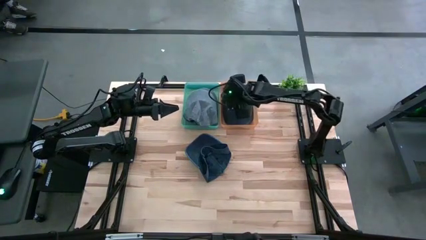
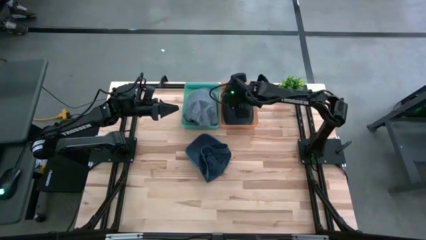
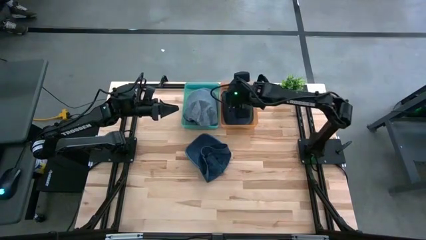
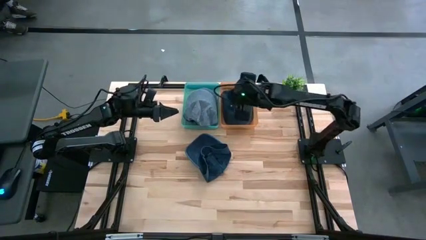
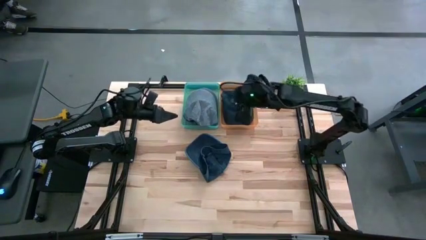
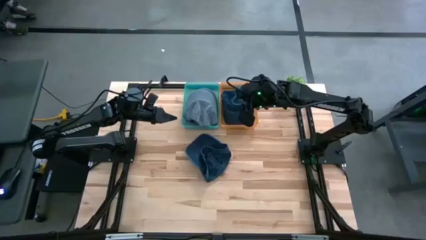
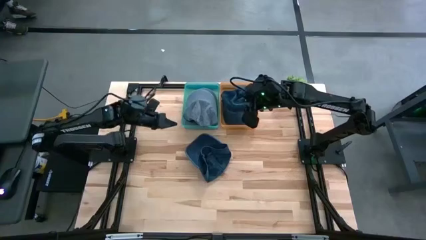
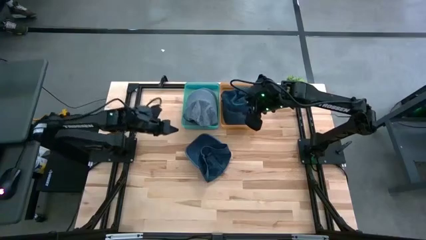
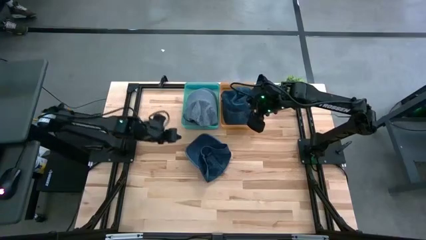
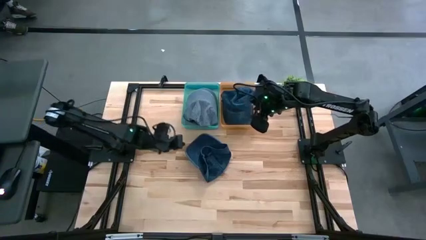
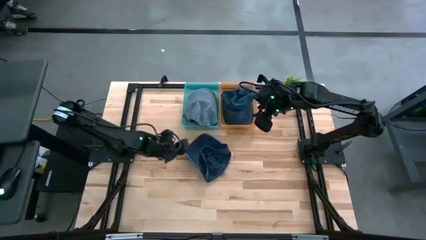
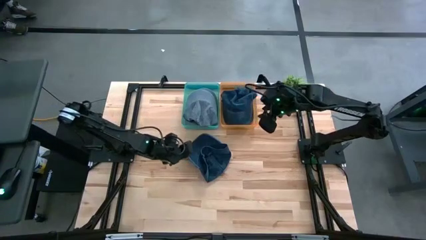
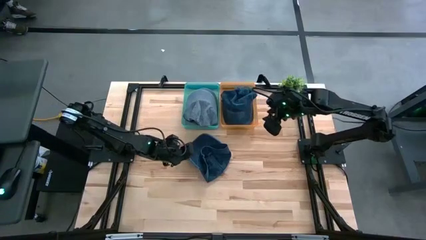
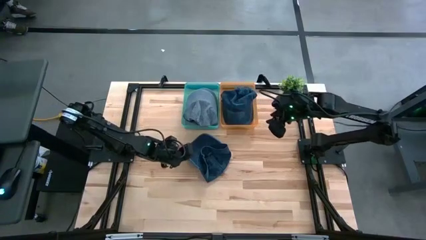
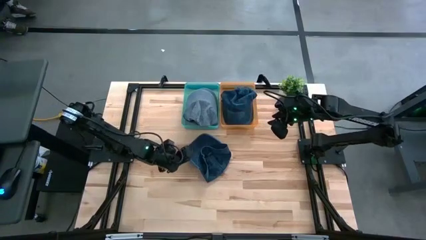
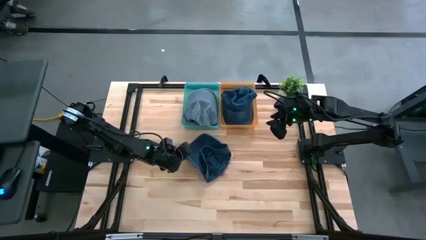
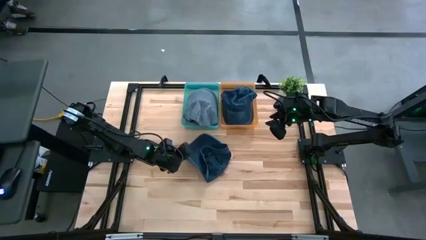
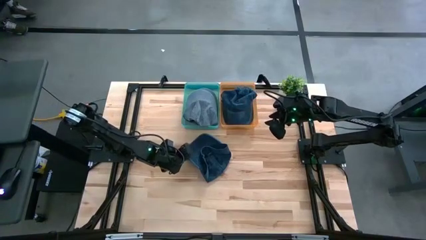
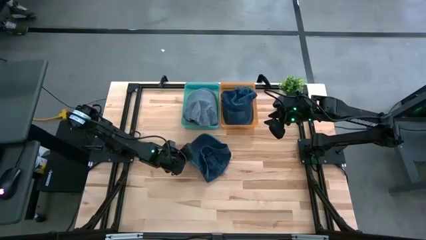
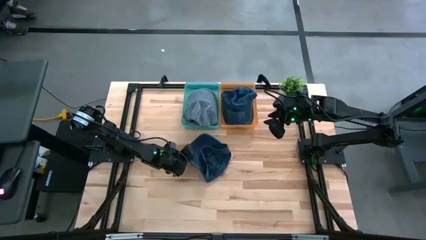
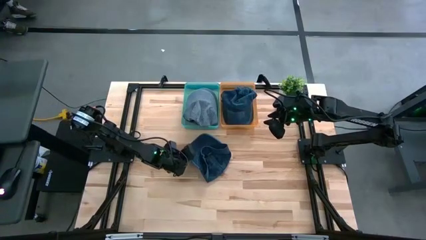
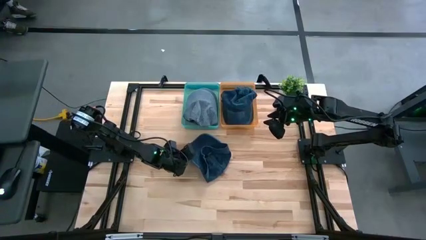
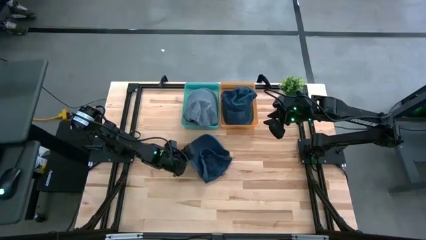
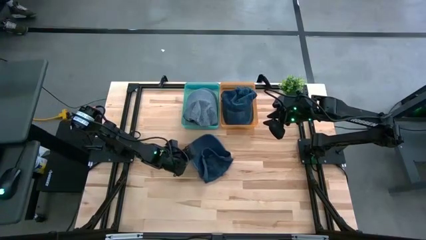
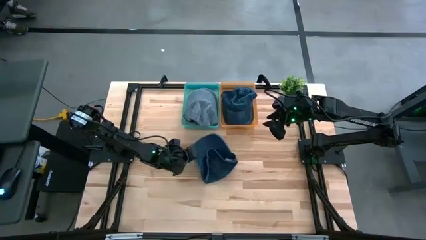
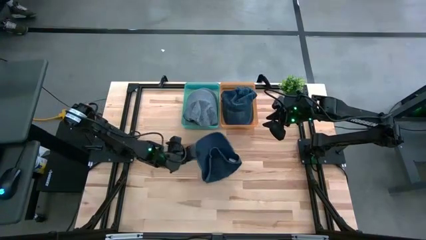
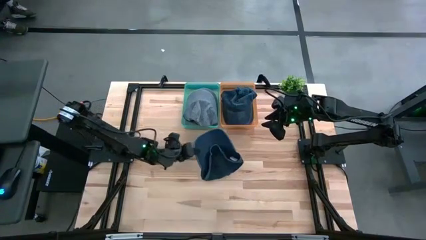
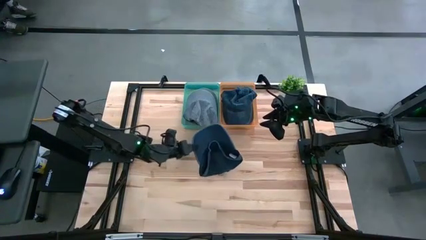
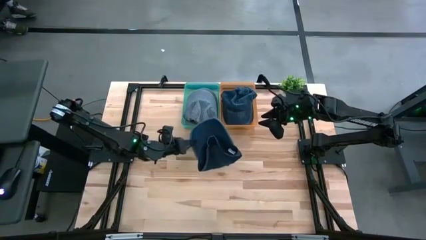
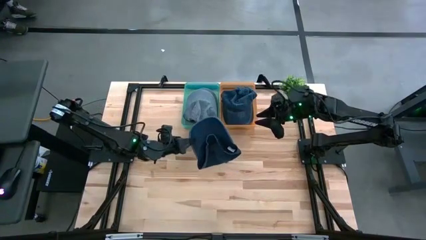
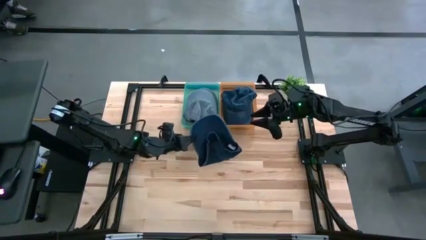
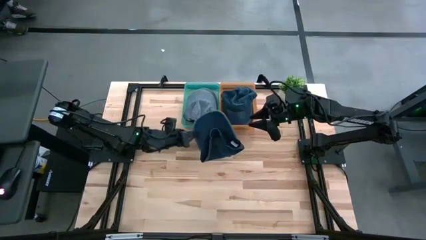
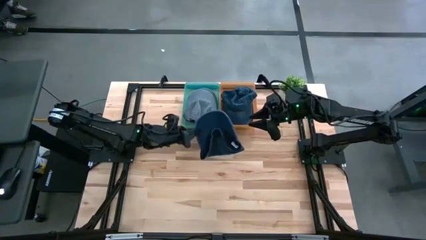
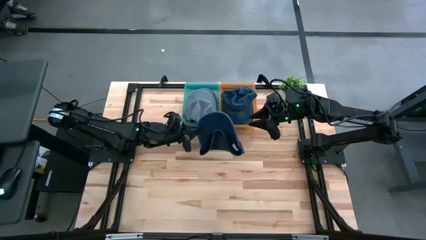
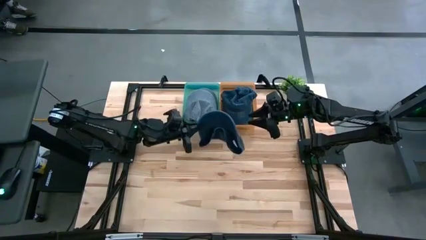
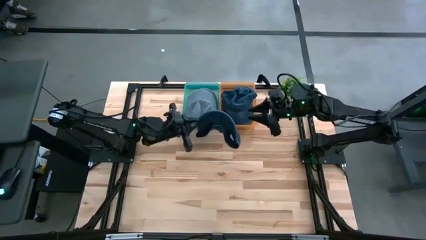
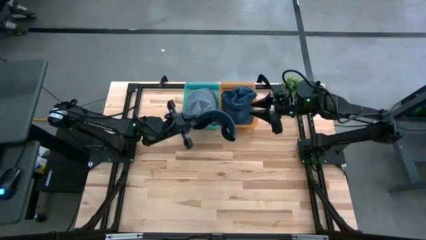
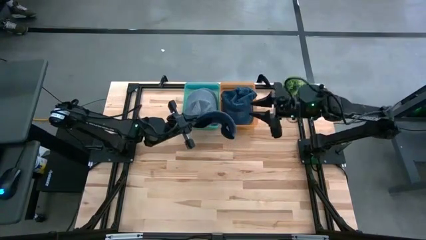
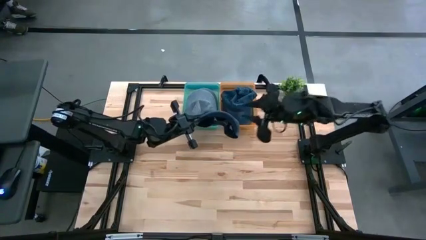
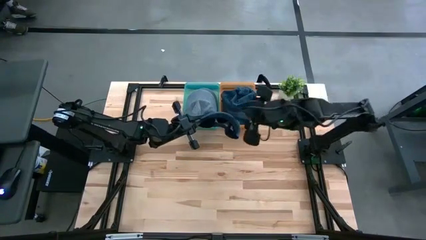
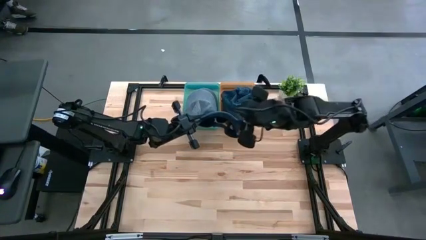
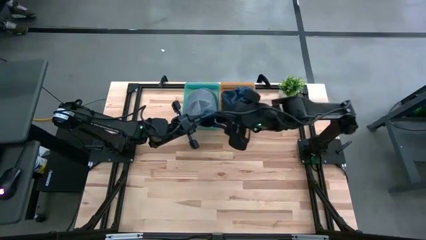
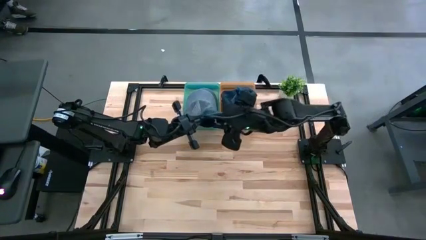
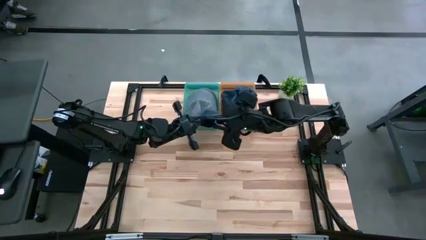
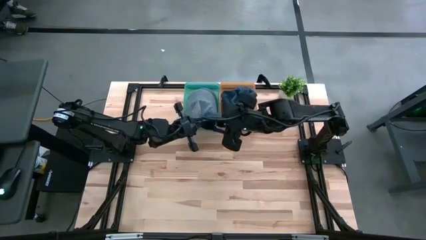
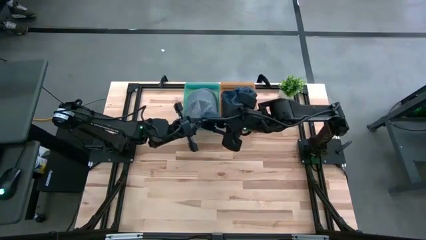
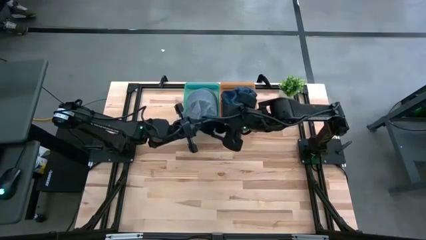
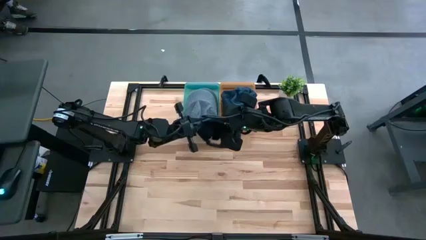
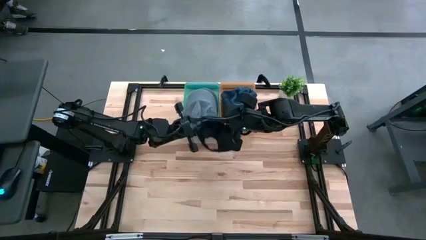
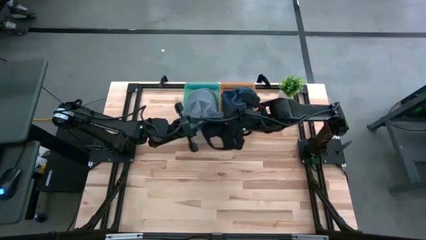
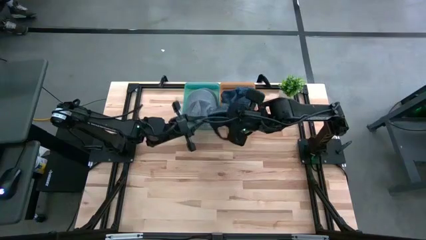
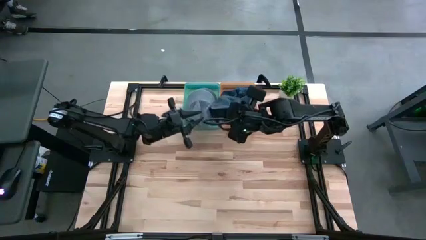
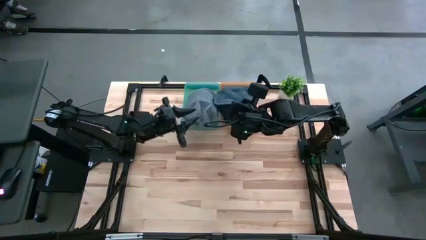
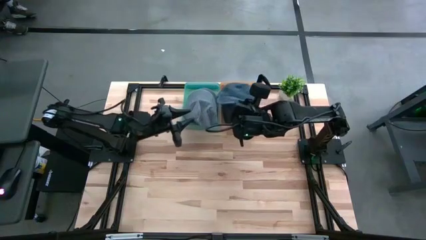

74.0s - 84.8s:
Task: Pick & Place hat
Put the black cap into the orange bin

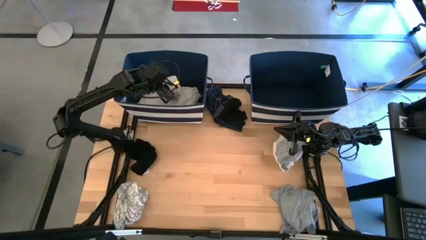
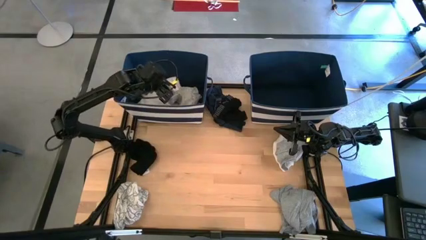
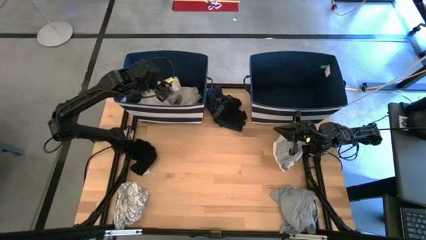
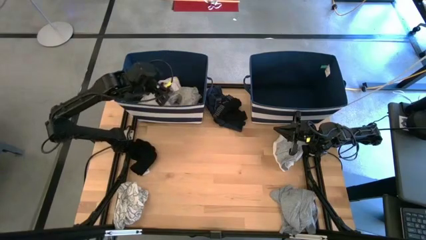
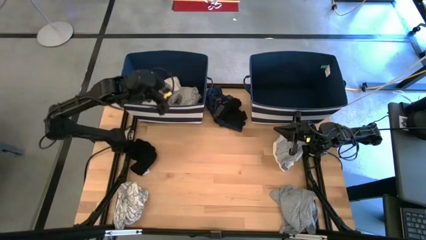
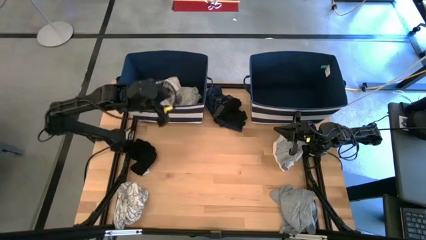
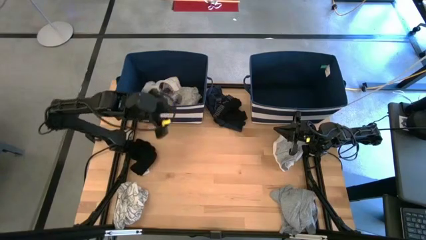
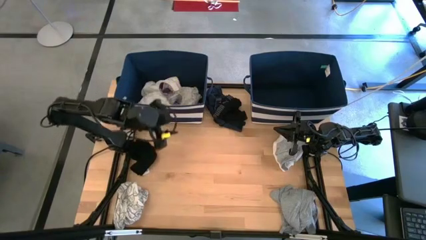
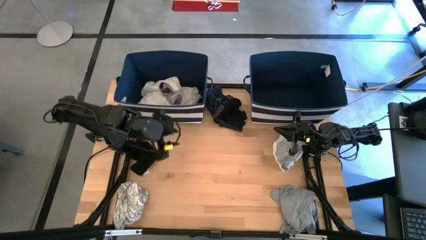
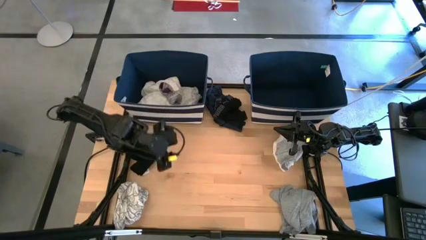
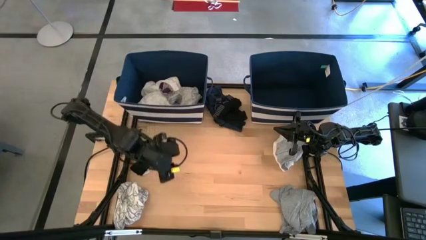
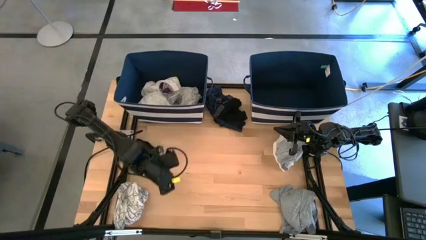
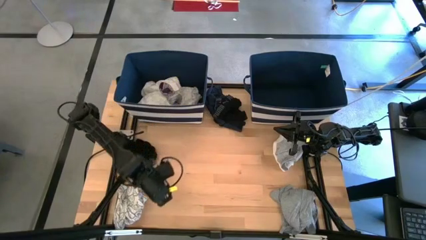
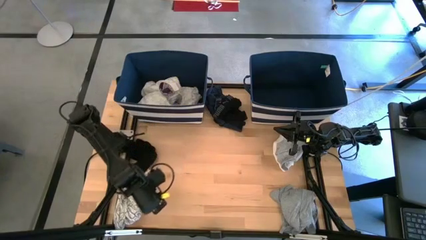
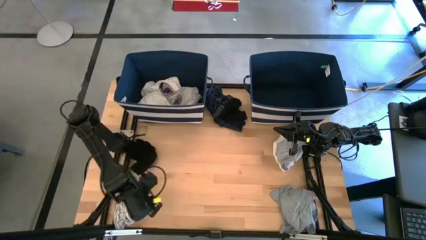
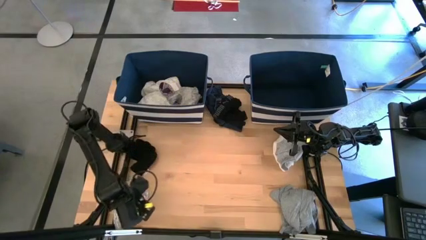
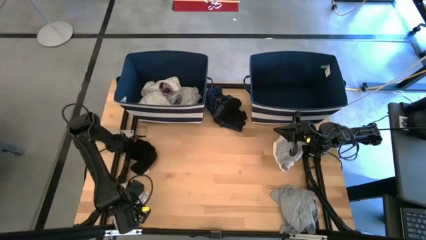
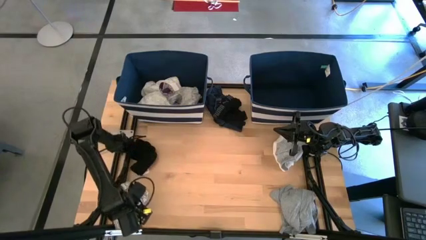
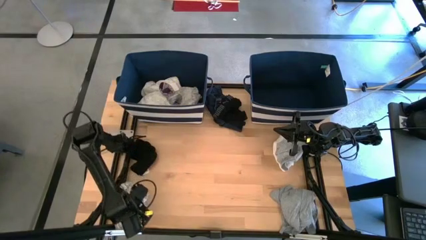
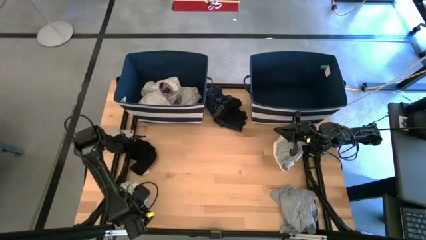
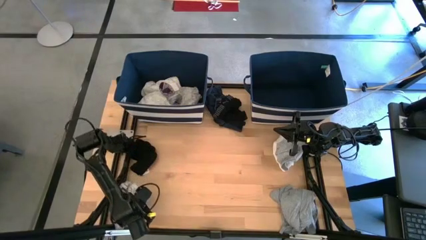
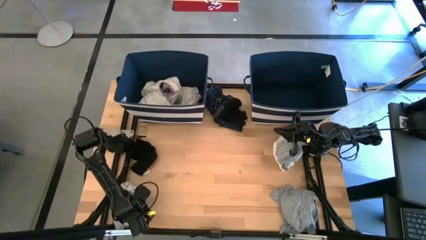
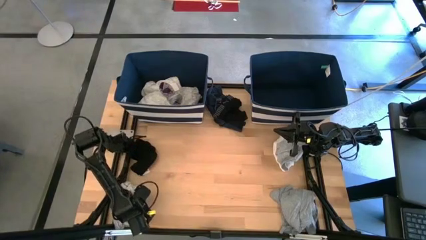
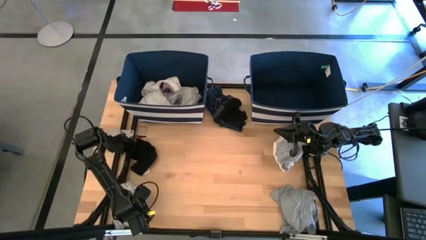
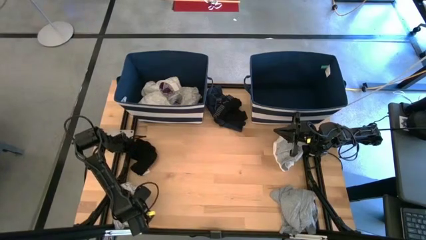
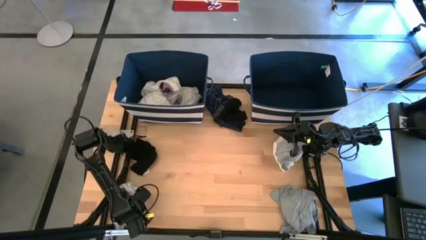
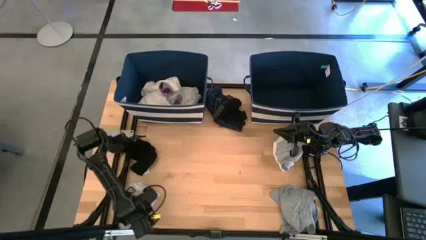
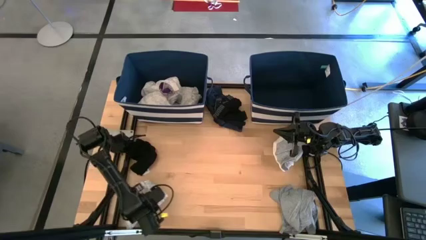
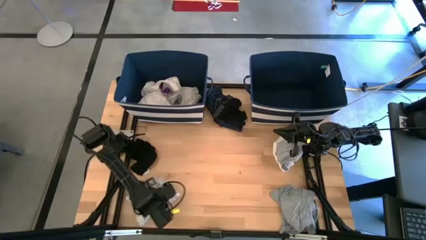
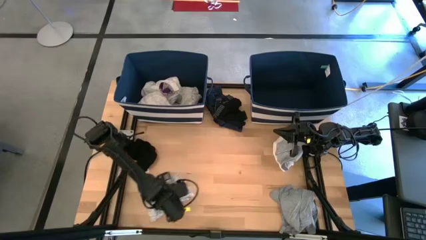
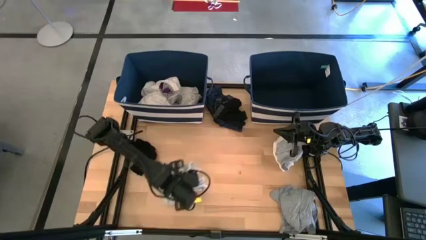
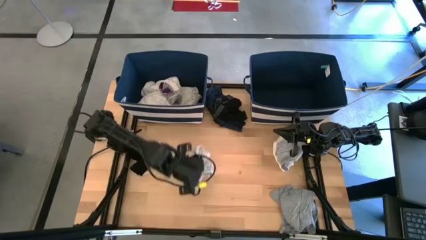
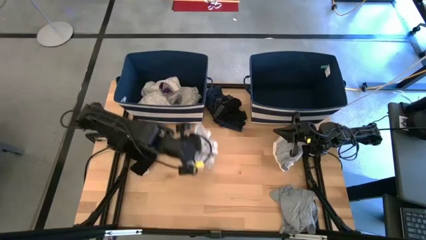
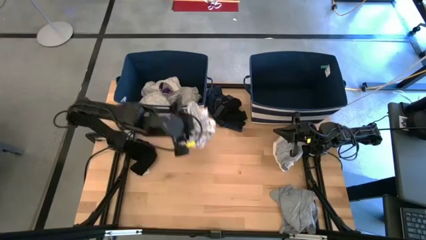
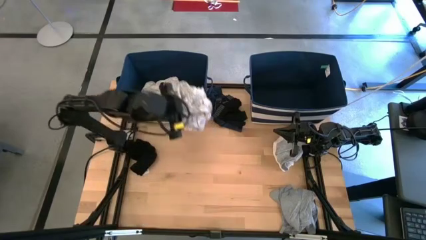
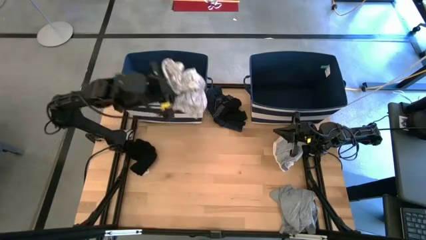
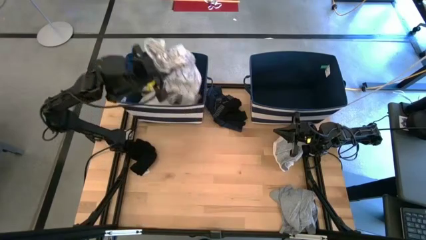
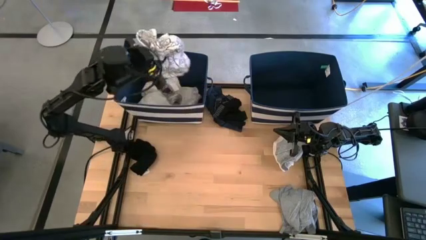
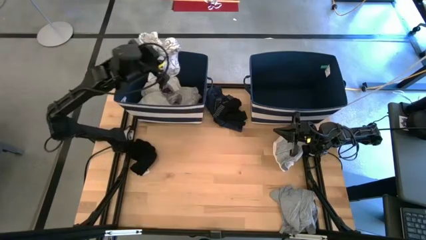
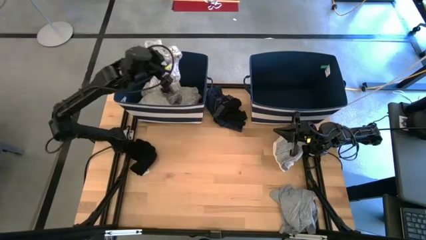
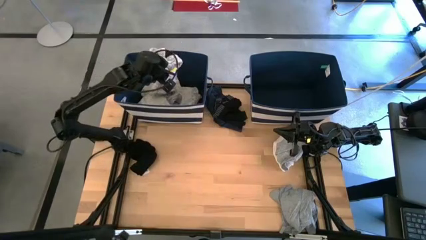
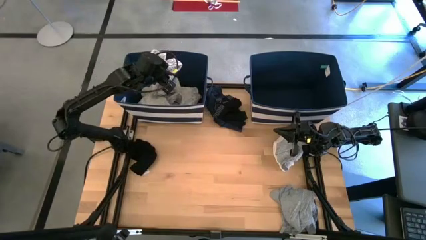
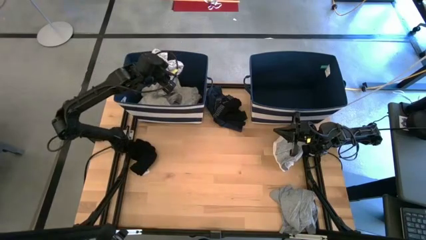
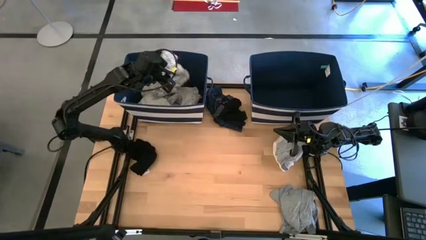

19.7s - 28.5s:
Task: Sort clothes
Put the white shirt into the left blue bin
